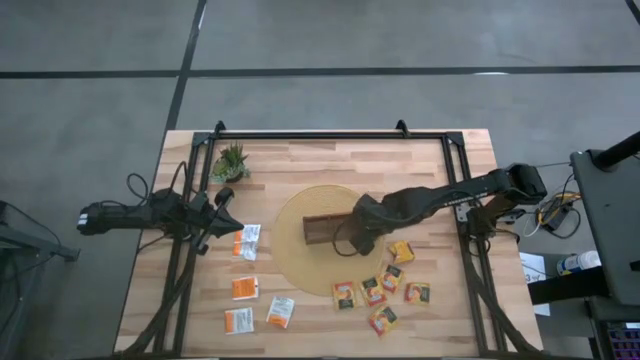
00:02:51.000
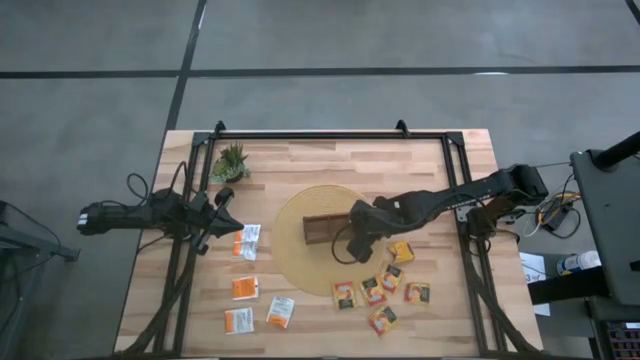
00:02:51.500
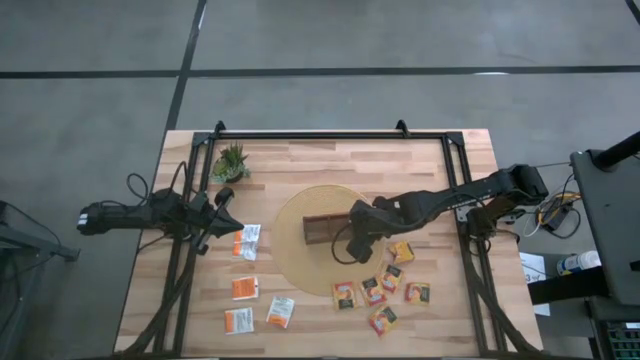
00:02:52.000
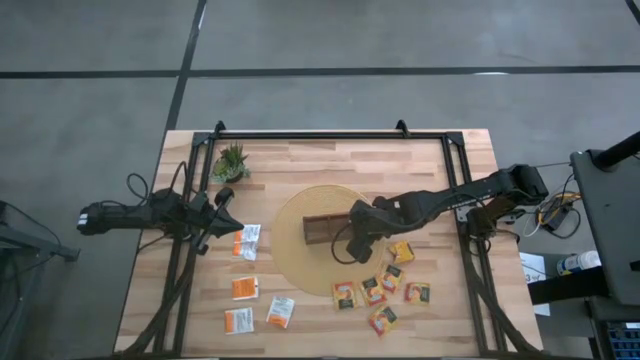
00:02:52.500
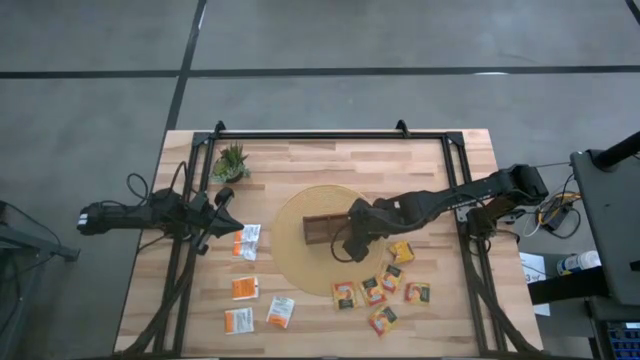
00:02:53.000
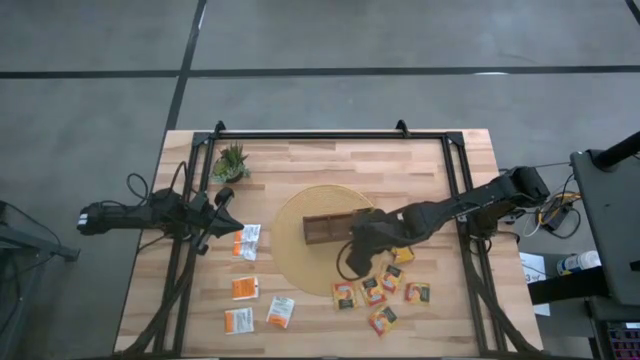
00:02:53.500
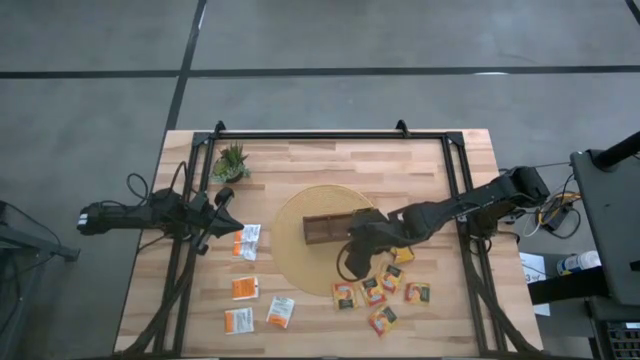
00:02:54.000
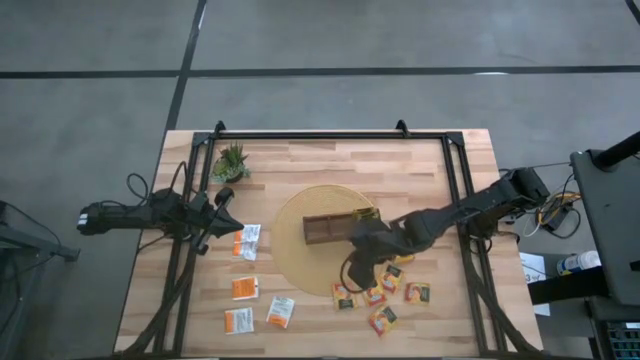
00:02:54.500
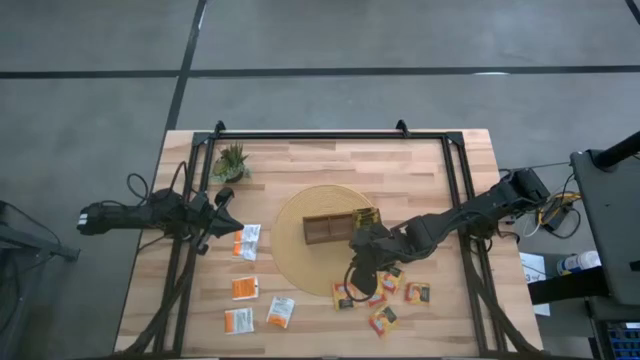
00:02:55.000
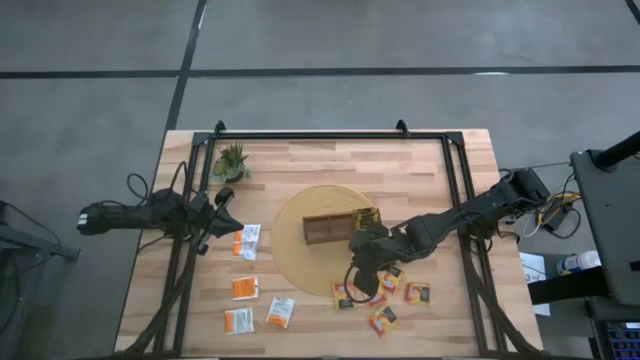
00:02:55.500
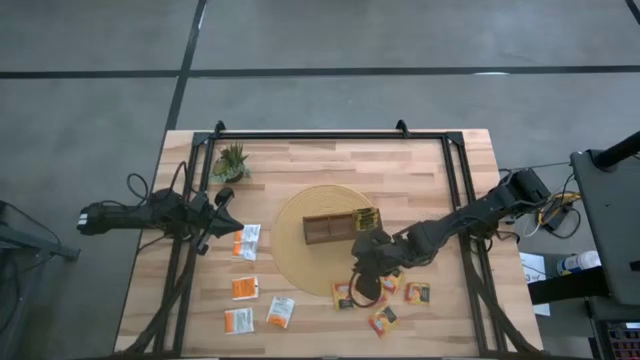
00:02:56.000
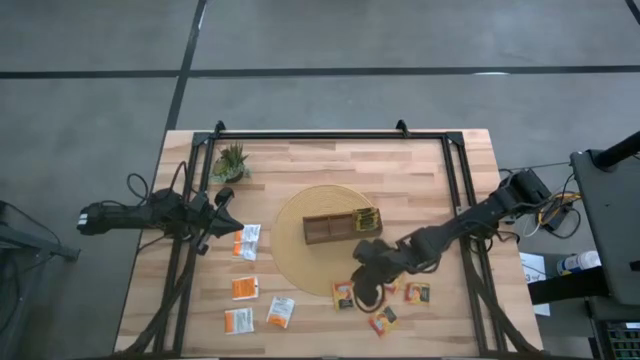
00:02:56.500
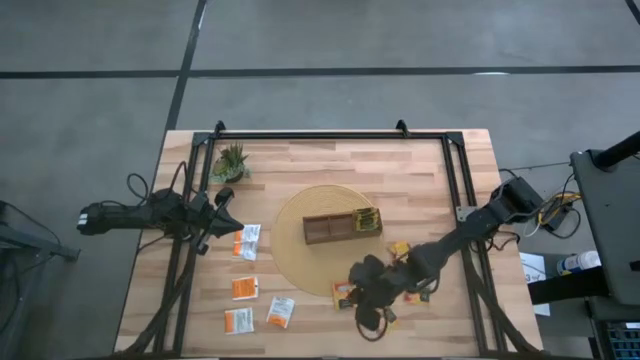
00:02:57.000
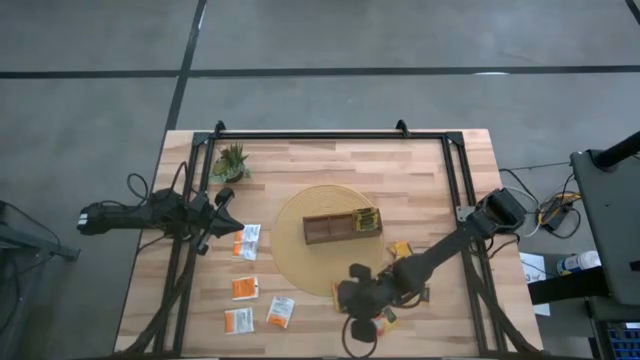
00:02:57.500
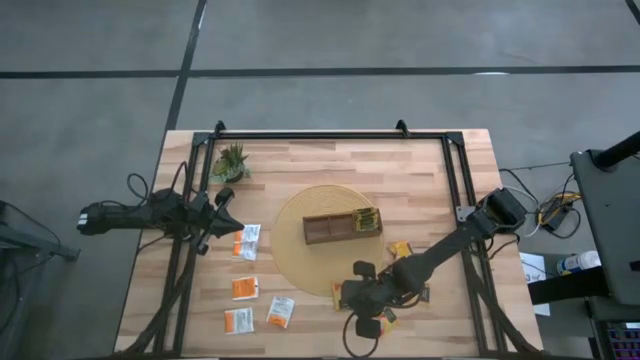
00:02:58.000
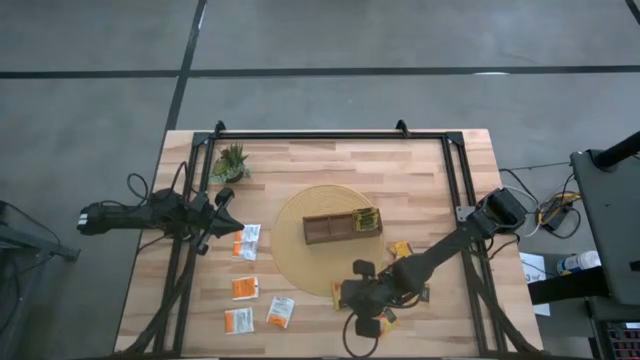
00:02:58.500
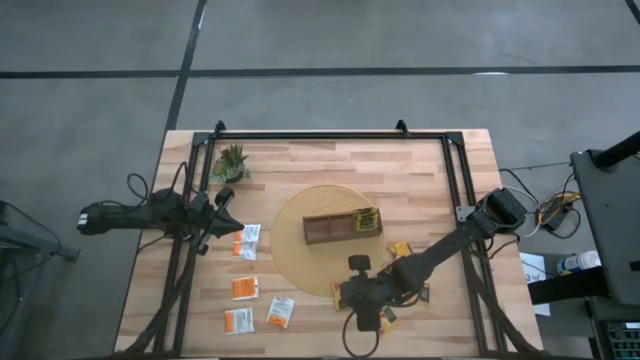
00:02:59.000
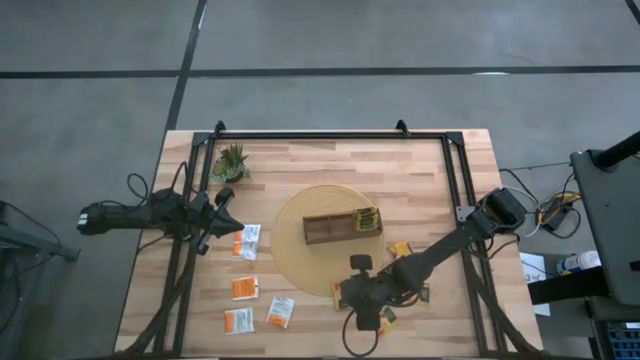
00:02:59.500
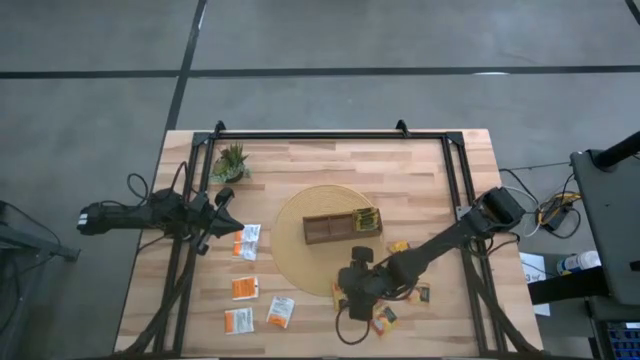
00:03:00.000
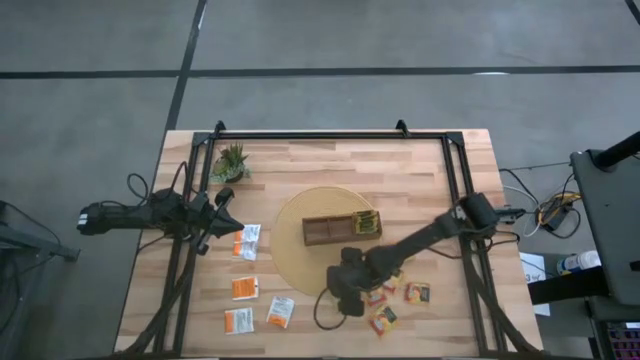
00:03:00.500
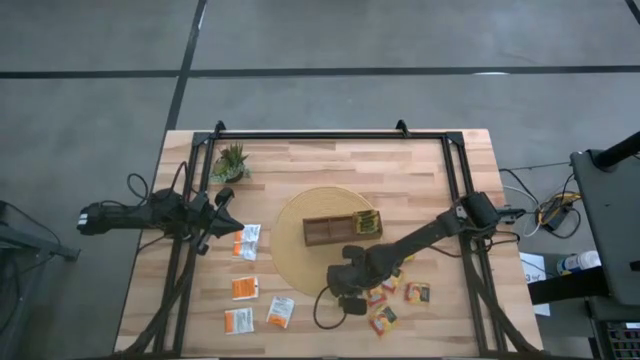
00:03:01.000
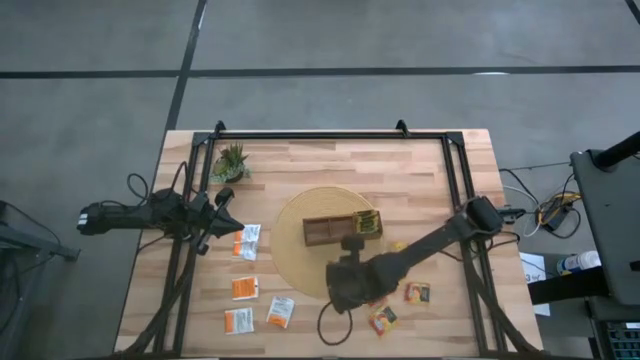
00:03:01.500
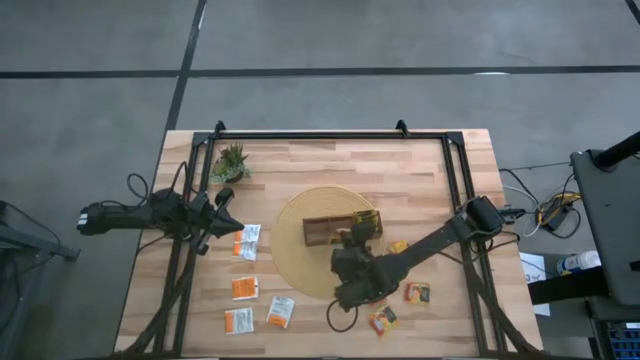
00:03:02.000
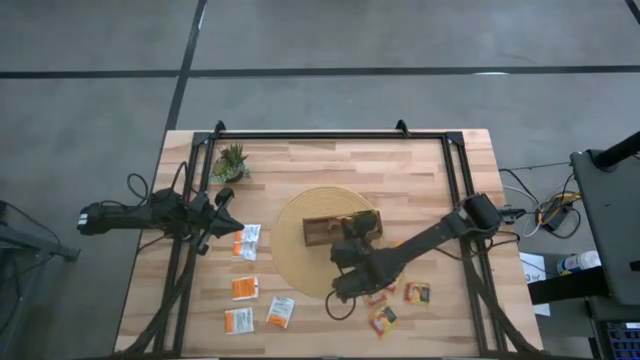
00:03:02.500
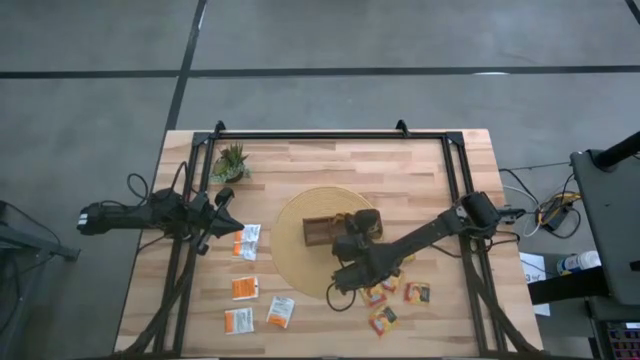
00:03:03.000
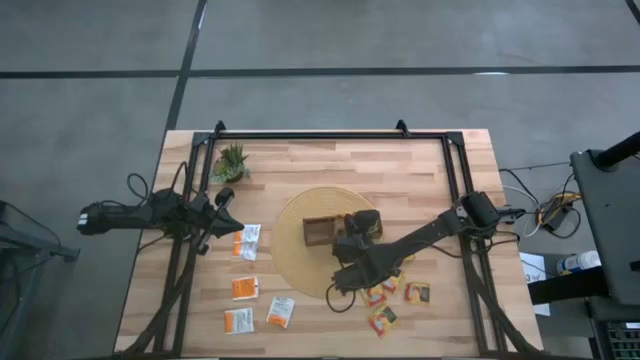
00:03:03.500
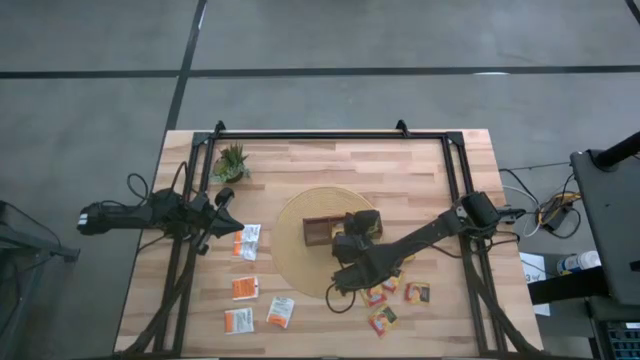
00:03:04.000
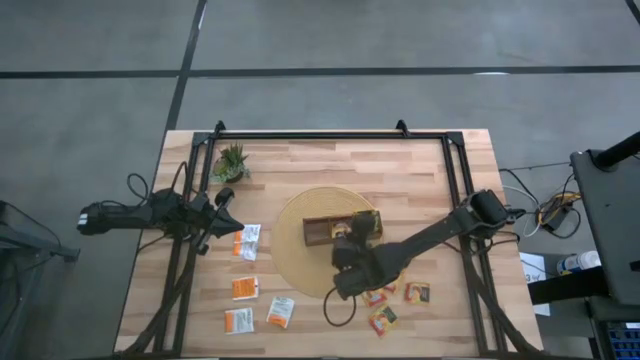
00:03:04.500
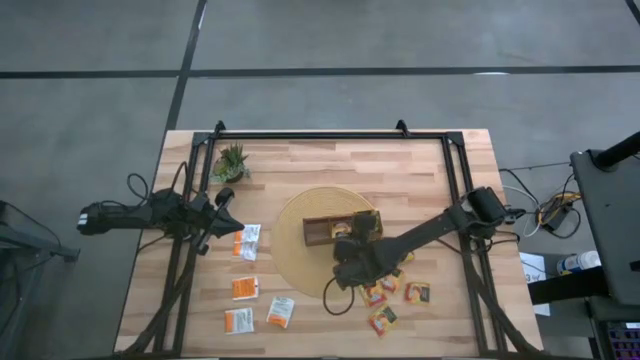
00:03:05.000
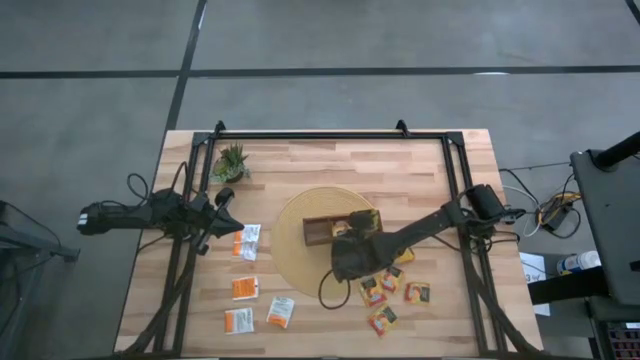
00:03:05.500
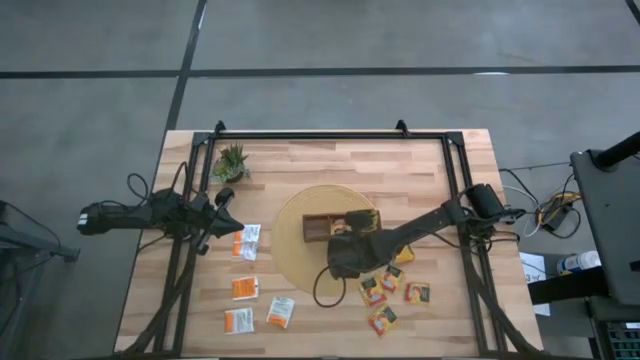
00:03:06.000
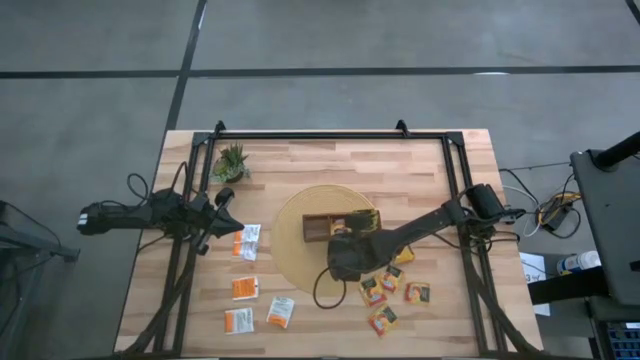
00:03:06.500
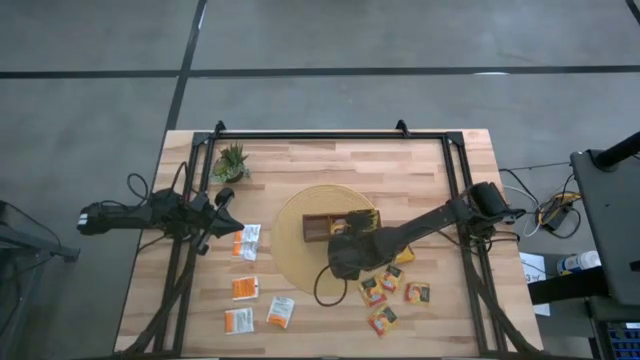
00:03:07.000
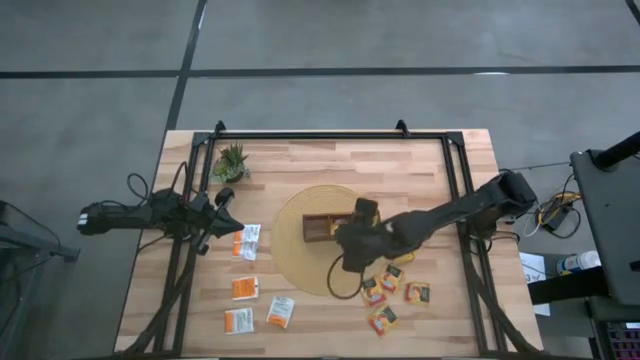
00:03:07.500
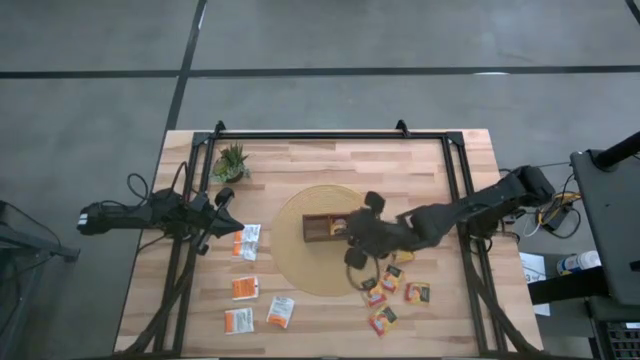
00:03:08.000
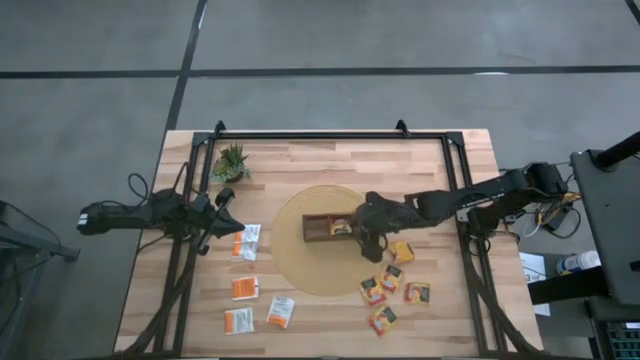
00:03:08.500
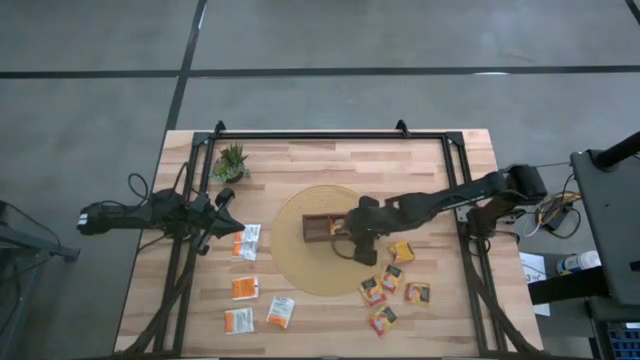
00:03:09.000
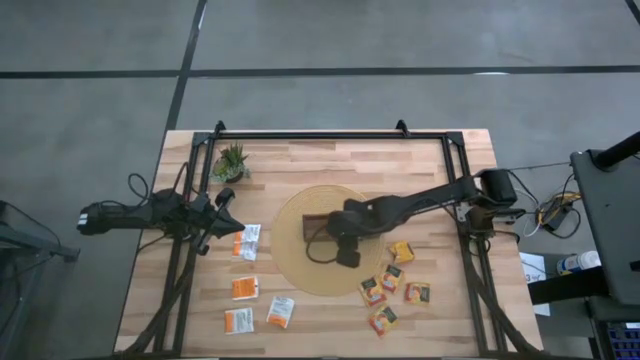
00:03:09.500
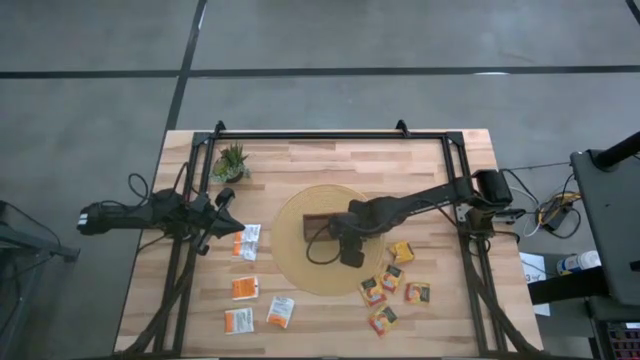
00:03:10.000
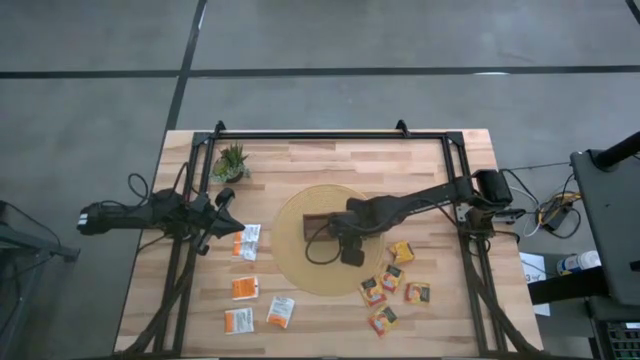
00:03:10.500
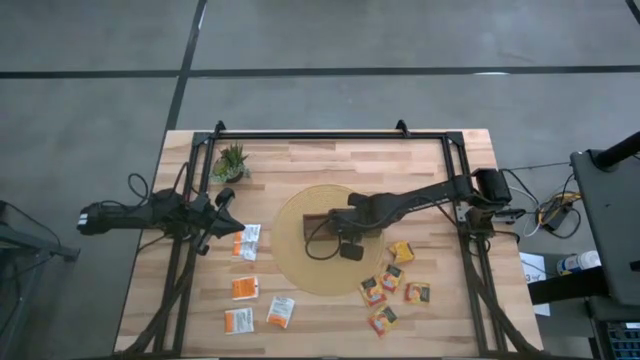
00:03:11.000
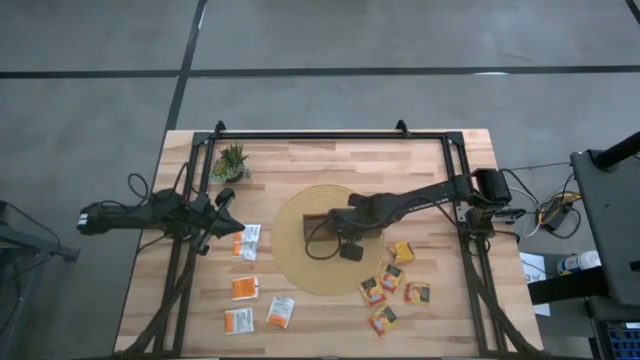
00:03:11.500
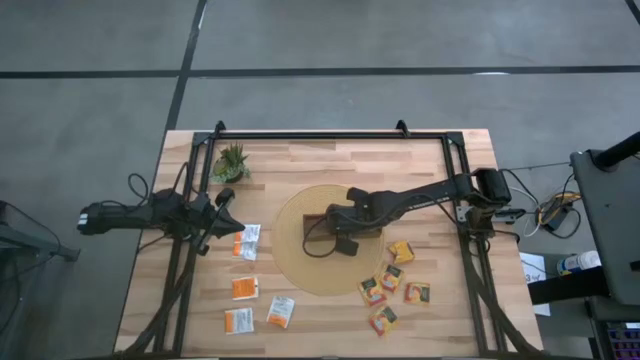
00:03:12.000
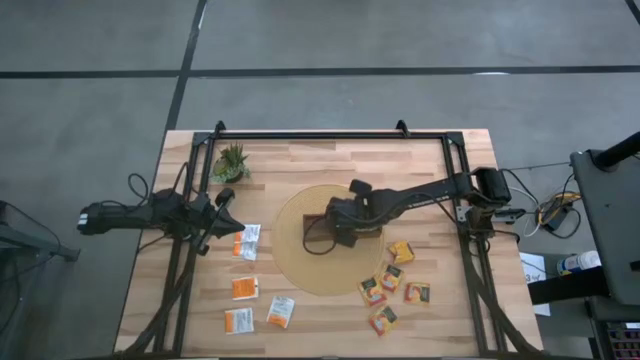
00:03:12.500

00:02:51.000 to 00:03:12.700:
Task: Pick & Place Tea
Put the orange tea bag into the middle of the wooden organizer
